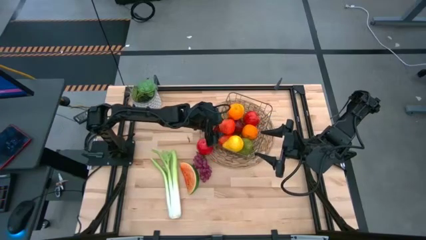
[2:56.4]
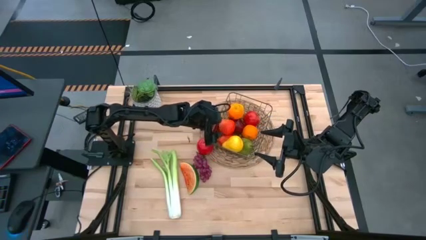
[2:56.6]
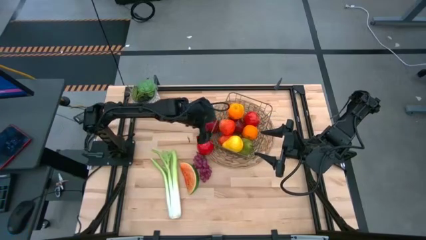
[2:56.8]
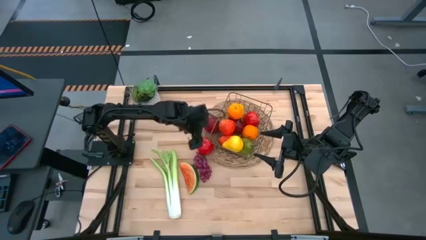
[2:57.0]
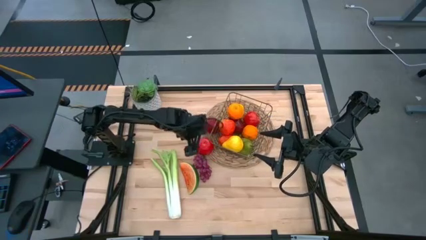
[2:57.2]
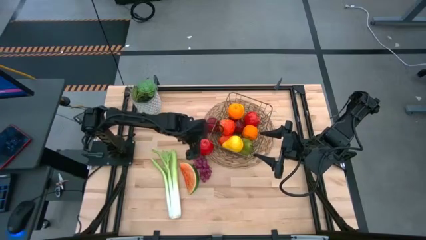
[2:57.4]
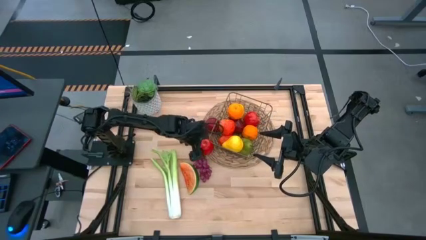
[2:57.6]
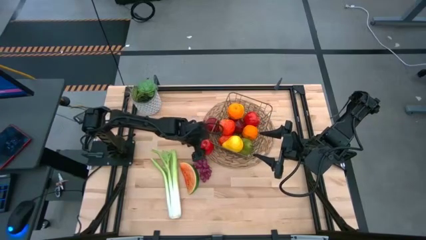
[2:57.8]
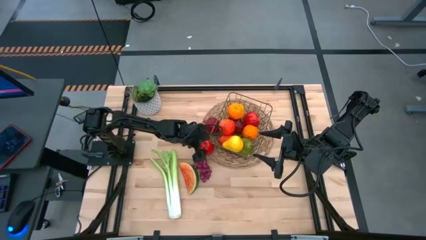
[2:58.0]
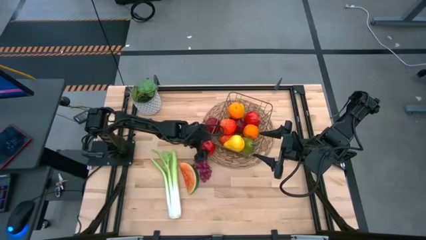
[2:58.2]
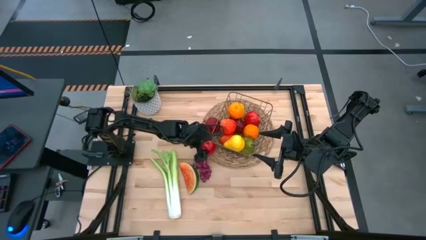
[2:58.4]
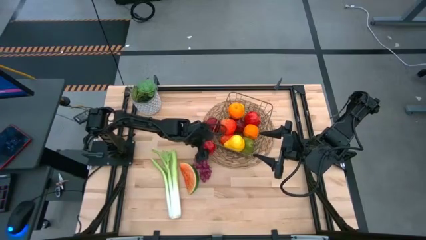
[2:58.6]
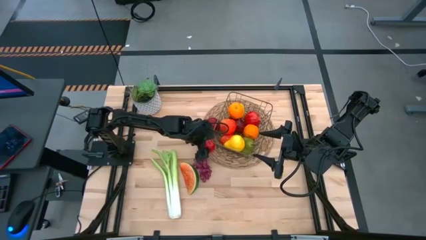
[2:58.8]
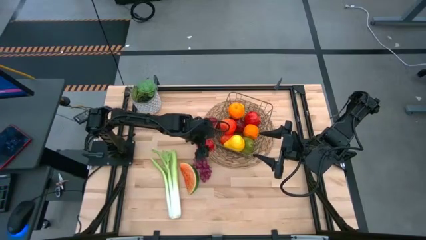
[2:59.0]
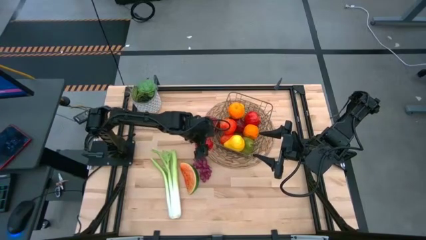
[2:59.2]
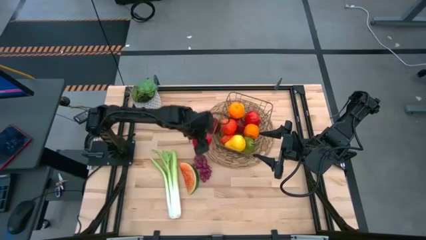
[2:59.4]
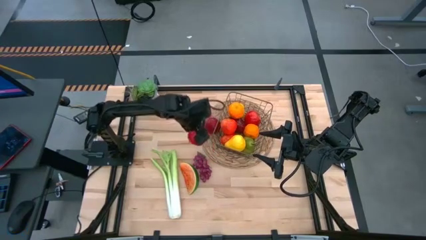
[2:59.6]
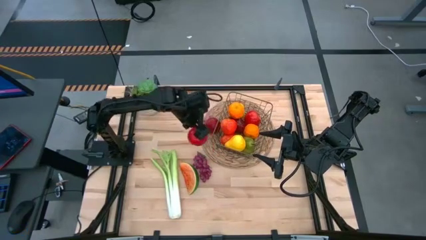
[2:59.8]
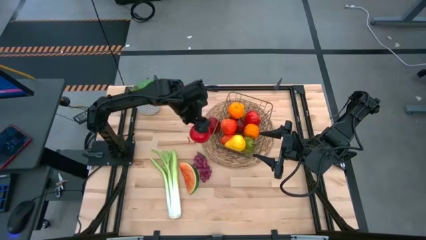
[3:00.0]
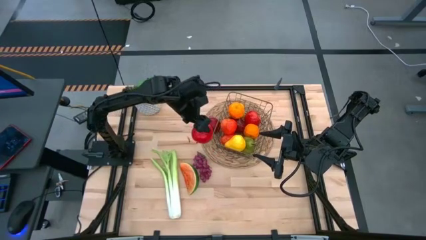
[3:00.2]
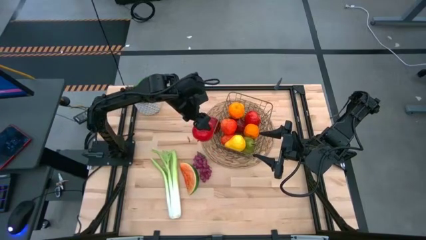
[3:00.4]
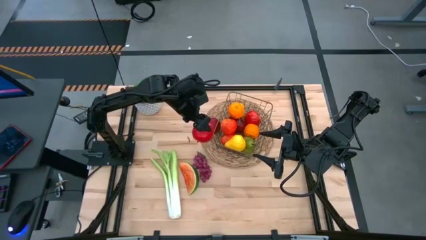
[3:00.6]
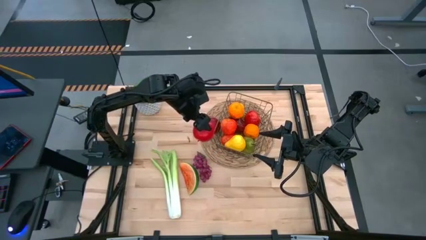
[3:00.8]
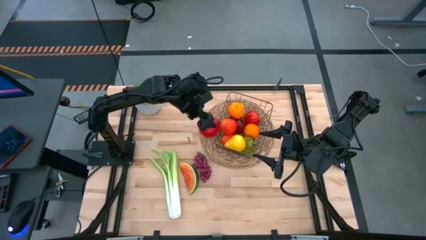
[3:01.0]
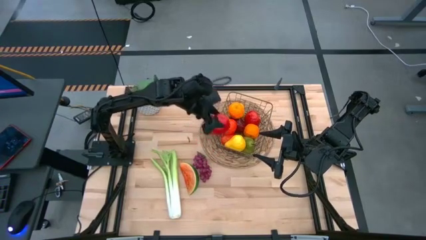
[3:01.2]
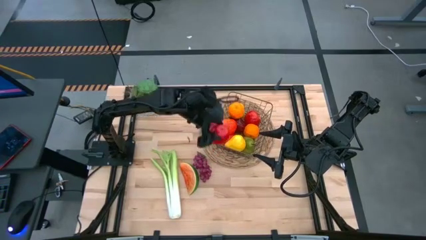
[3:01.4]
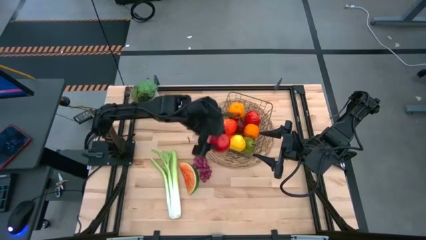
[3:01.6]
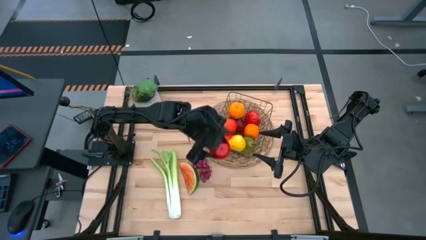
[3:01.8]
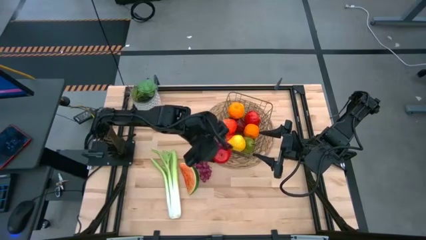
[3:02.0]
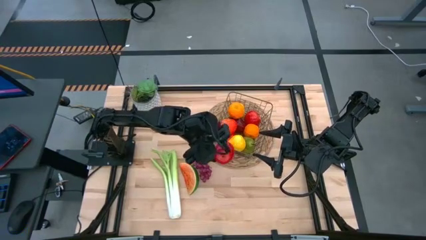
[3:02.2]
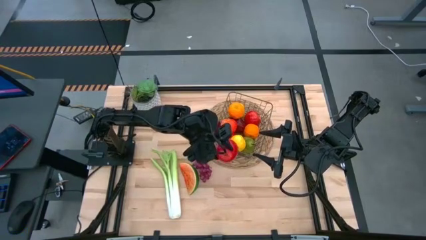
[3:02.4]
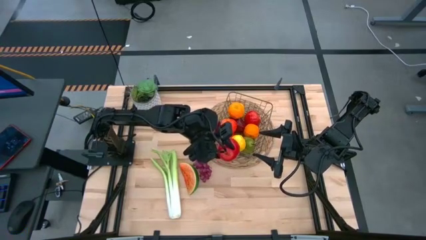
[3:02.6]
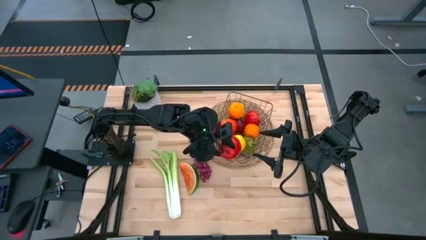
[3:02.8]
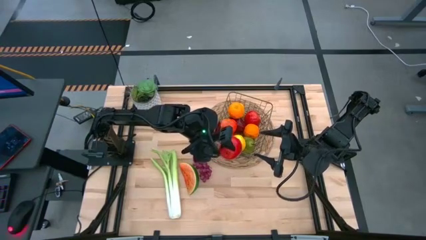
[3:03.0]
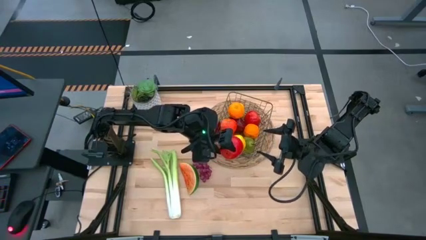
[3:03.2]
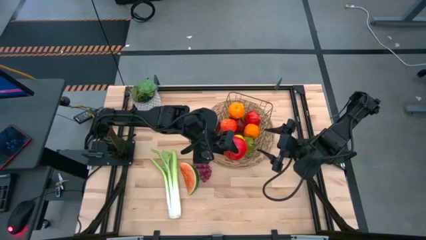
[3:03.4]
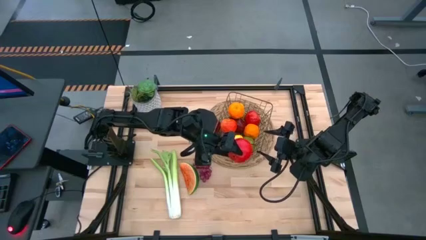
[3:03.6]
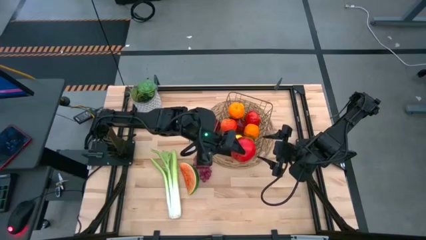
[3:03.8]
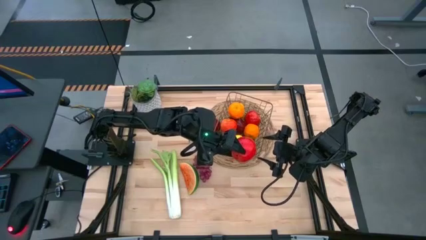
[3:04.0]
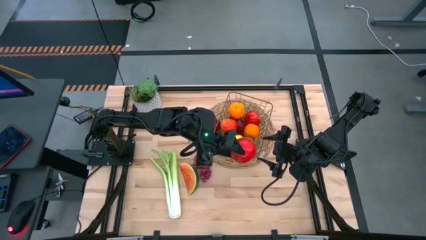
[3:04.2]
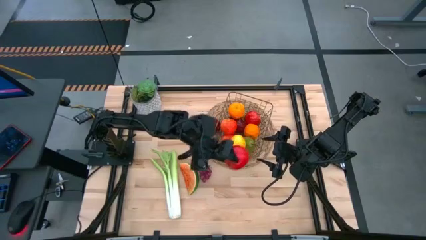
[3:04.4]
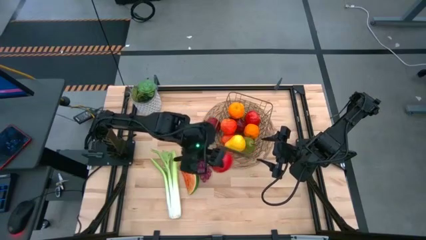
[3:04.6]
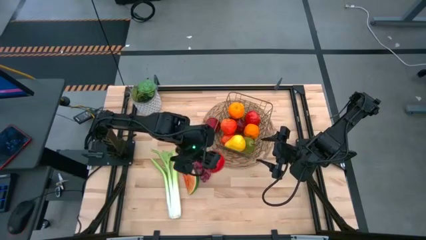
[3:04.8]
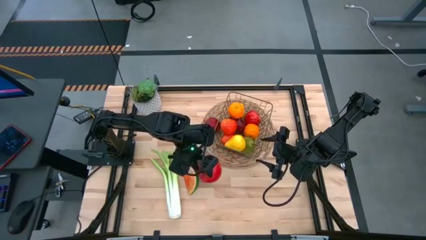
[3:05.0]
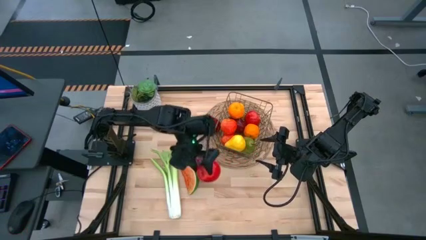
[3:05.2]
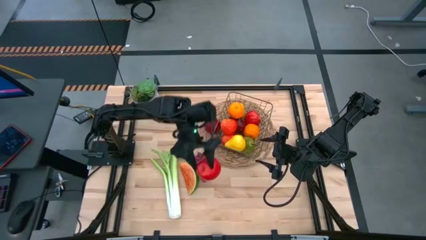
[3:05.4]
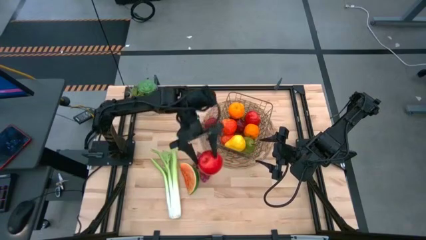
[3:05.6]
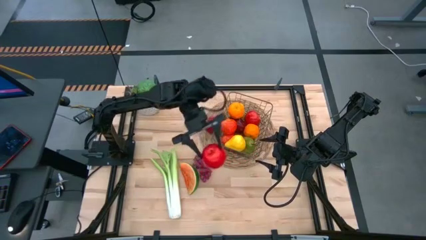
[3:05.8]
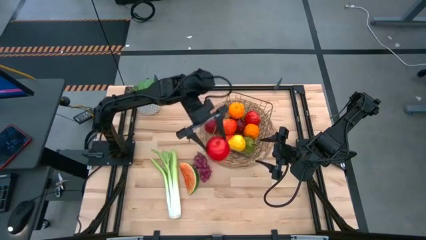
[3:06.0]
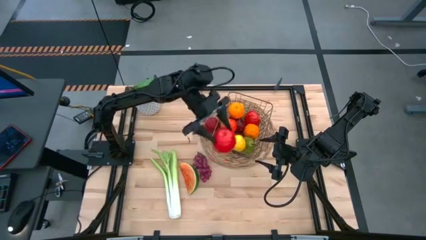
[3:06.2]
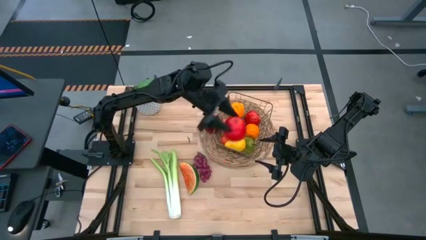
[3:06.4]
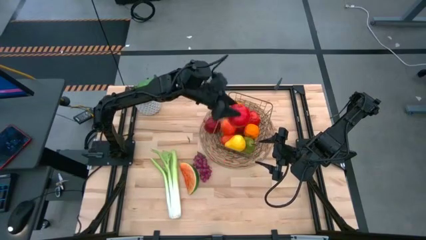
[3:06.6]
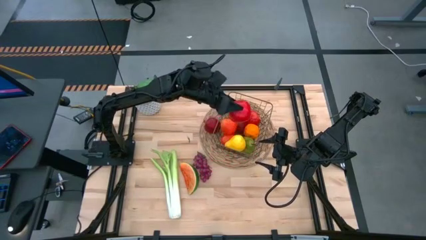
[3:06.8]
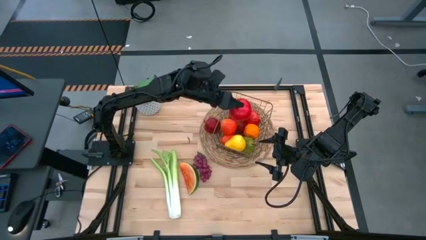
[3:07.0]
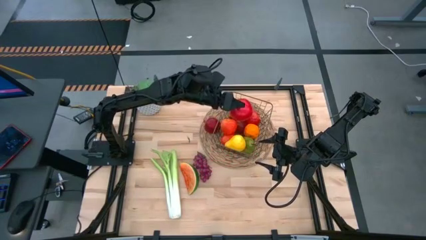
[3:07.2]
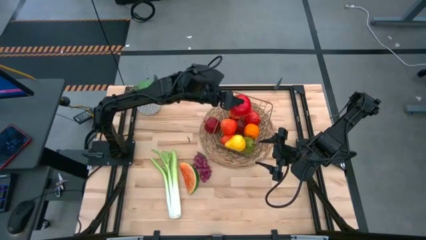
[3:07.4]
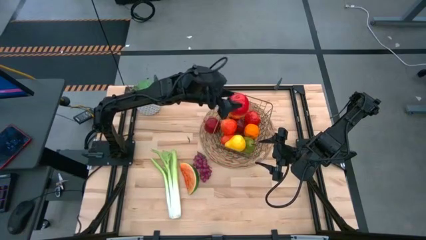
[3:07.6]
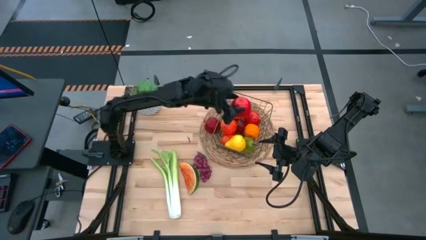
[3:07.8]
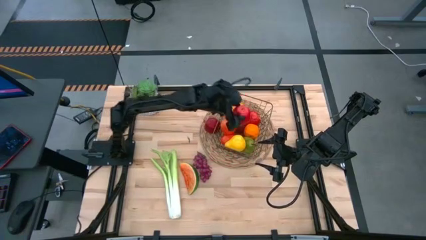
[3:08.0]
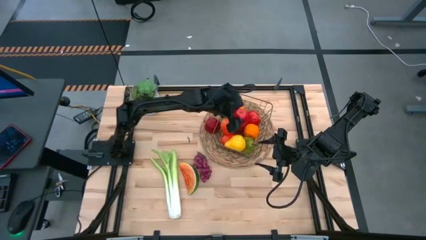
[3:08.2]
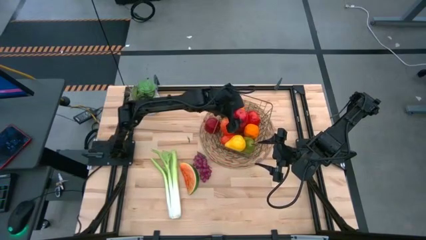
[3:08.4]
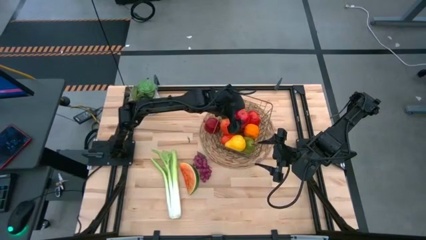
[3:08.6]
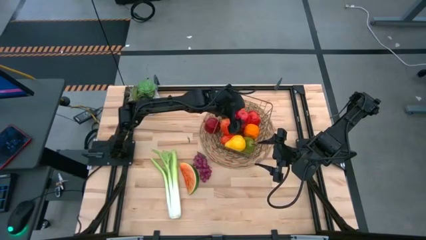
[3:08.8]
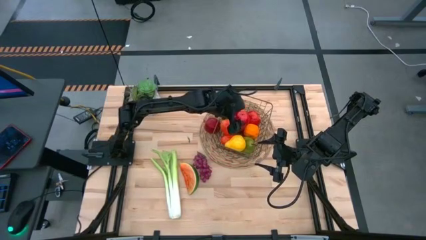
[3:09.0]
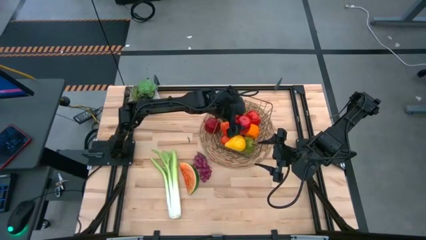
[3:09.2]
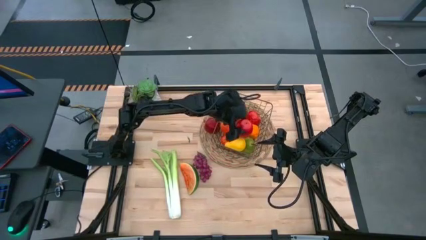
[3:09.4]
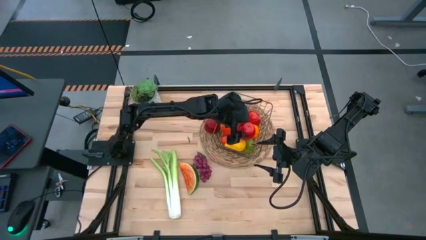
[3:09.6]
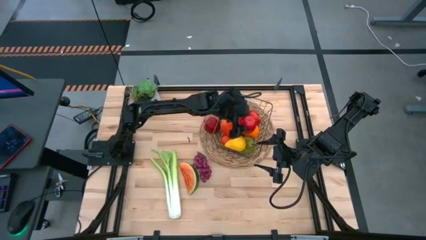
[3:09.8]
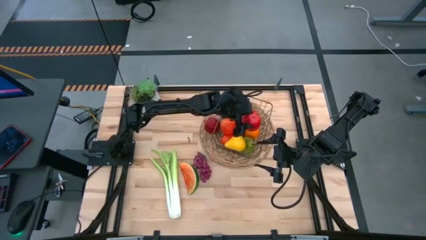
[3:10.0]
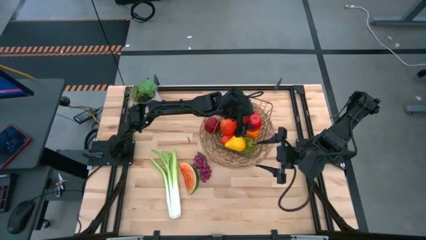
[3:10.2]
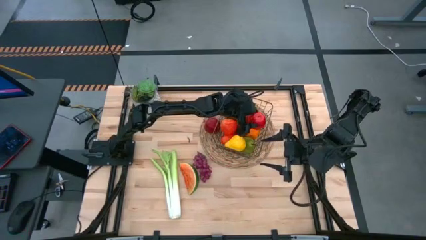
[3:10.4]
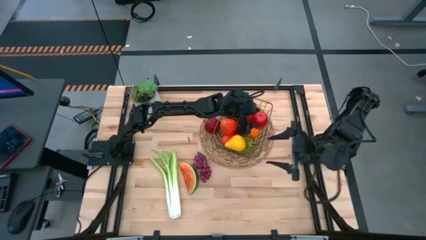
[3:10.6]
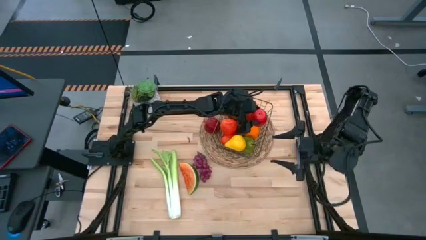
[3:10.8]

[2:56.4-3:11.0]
Task: Build produce basket
Put the red apple into the gold wire basket

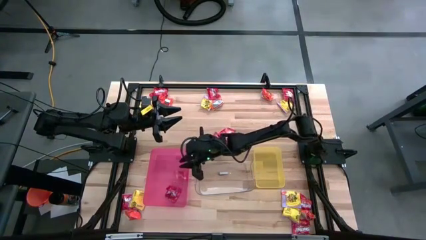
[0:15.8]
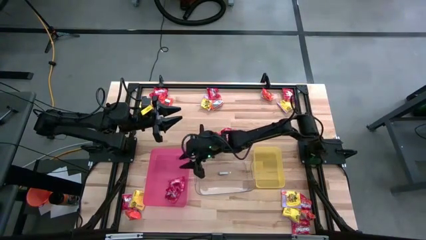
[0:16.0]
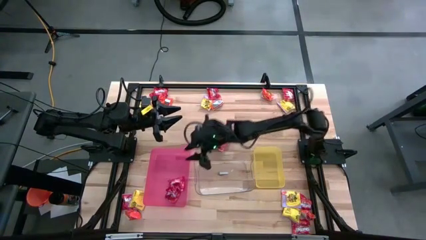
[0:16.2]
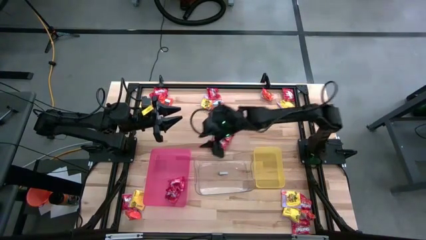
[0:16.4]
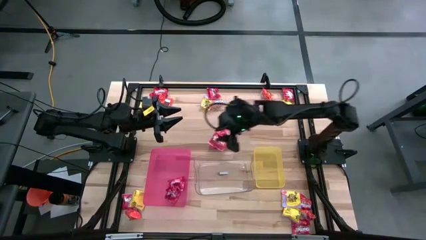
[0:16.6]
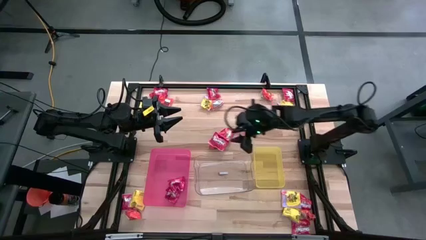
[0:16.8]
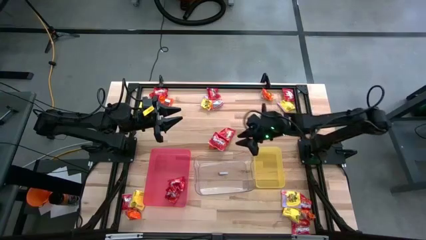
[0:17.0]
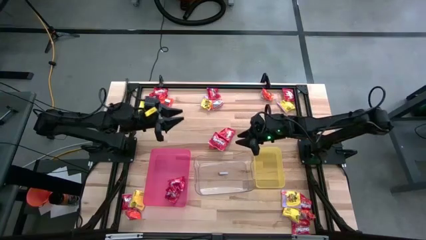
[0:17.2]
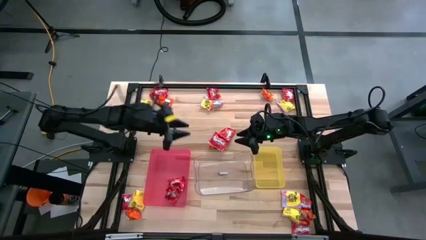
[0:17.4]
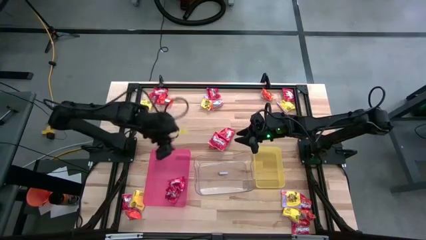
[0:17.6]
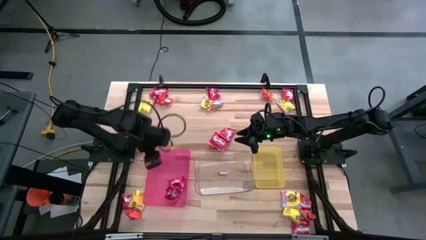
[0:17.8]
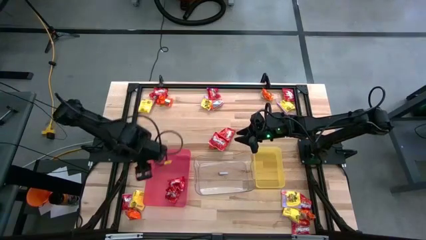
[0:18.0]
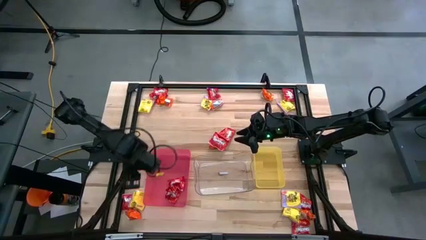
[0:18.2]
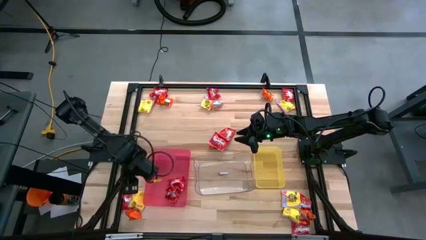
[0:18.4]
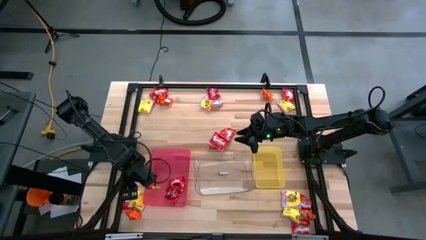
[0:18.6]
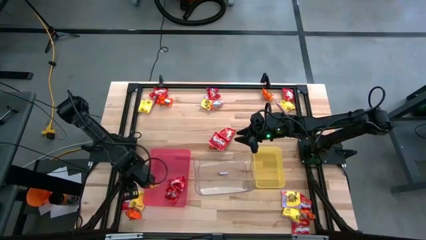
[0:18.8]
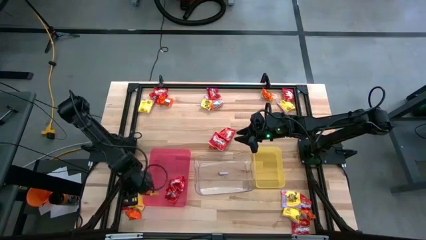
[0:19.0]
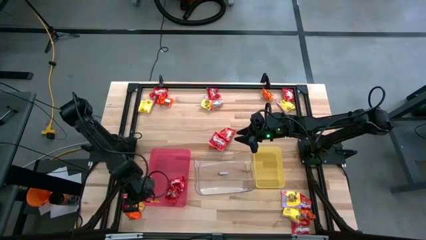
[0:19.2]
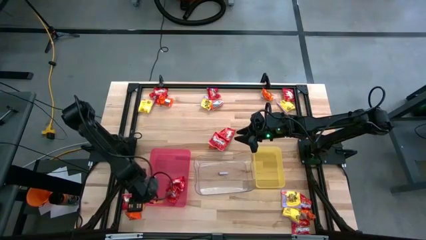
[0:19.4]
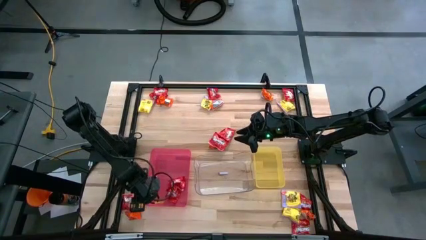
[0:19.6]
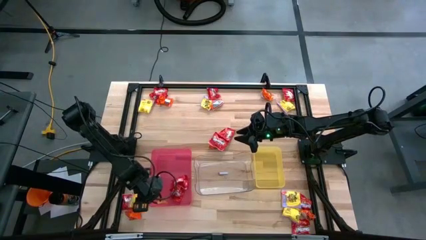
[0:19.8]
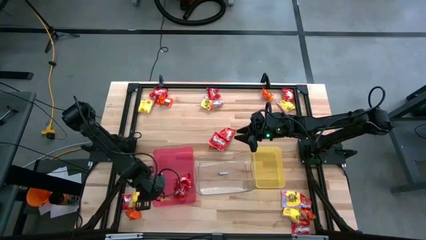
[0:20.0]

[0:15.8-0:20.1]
Task: Sort candy
Adjust the red bin on the table
